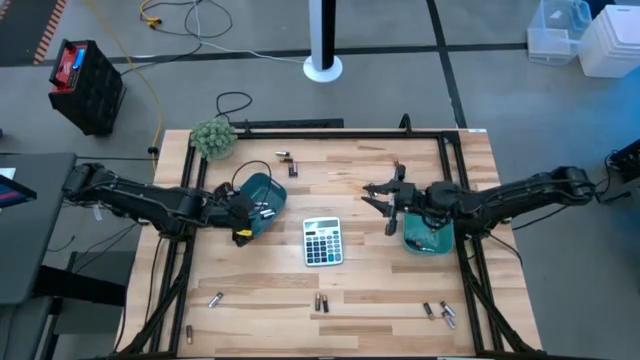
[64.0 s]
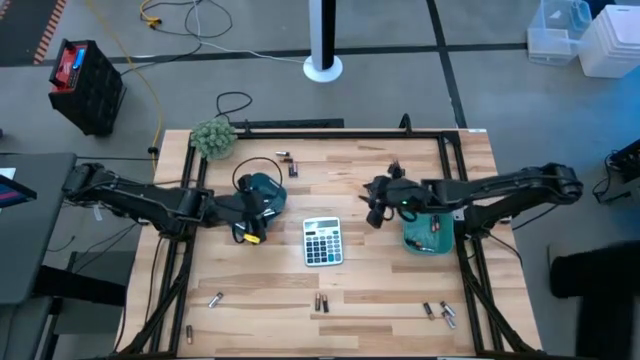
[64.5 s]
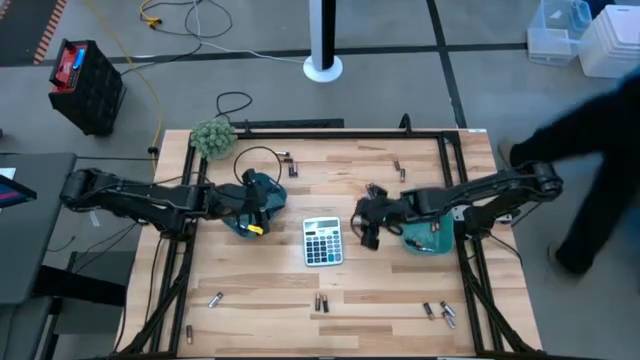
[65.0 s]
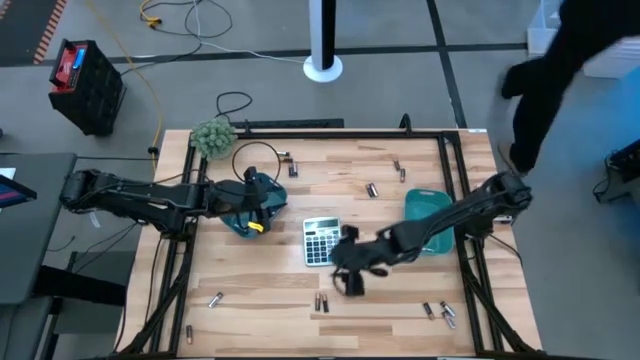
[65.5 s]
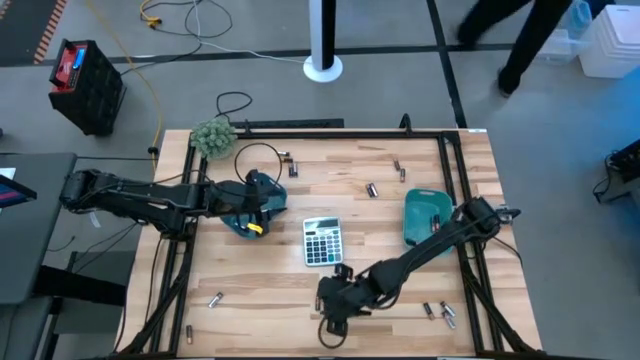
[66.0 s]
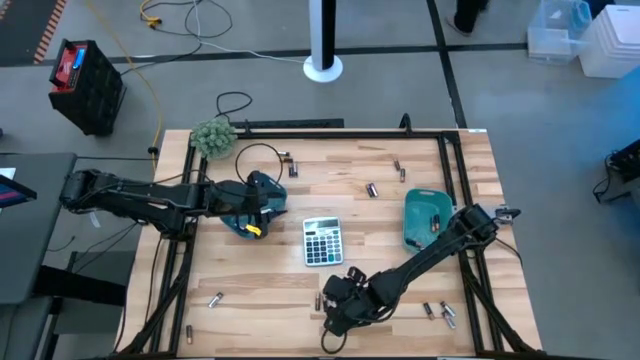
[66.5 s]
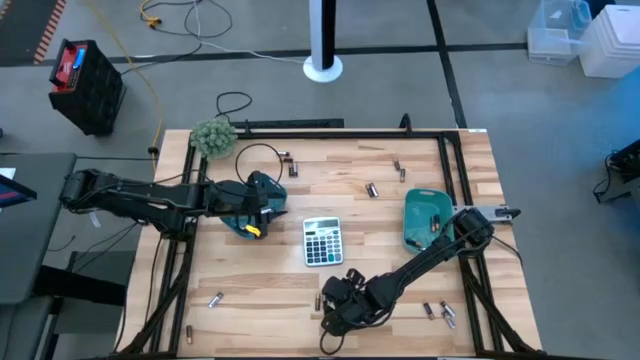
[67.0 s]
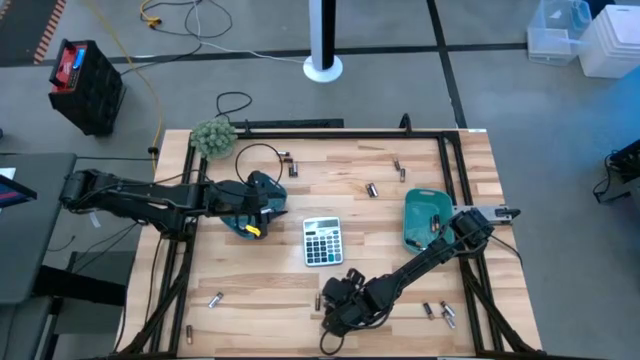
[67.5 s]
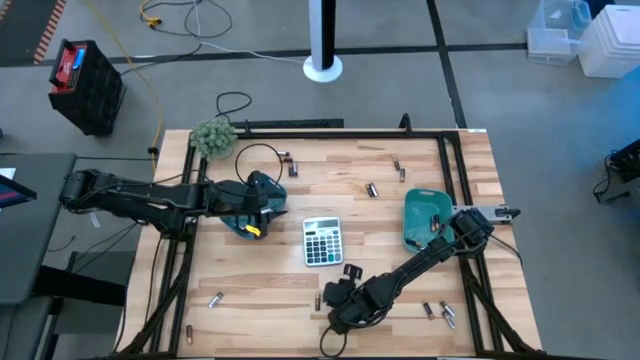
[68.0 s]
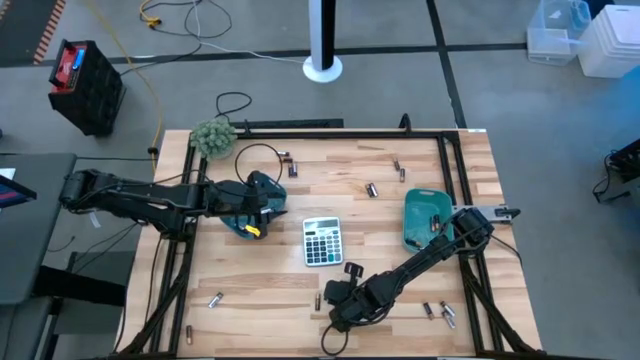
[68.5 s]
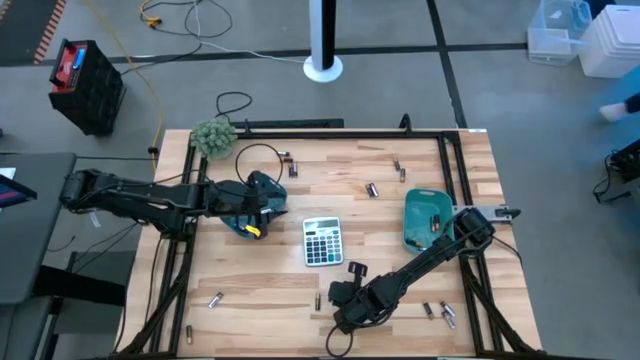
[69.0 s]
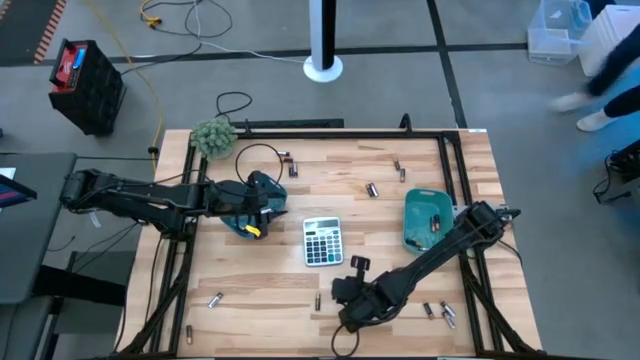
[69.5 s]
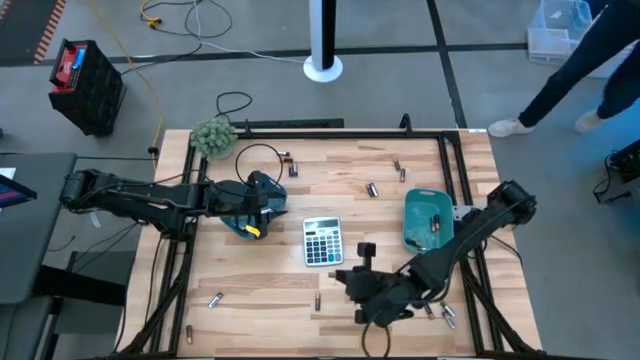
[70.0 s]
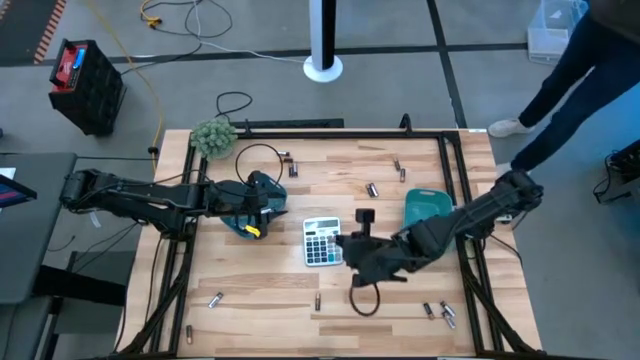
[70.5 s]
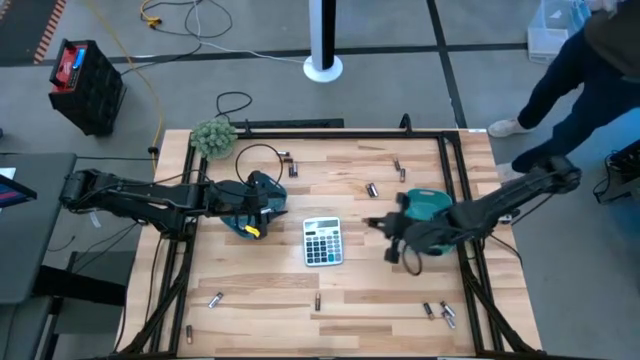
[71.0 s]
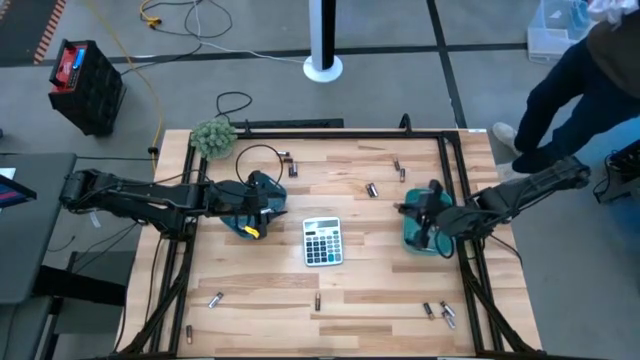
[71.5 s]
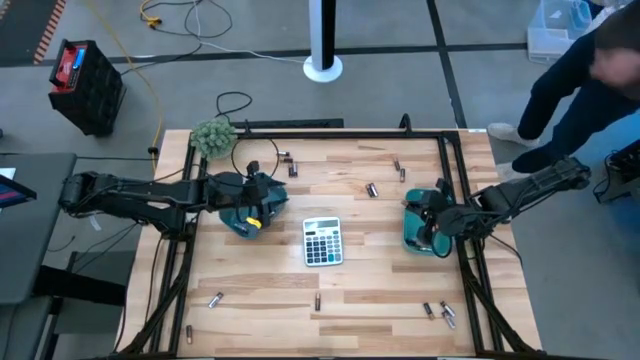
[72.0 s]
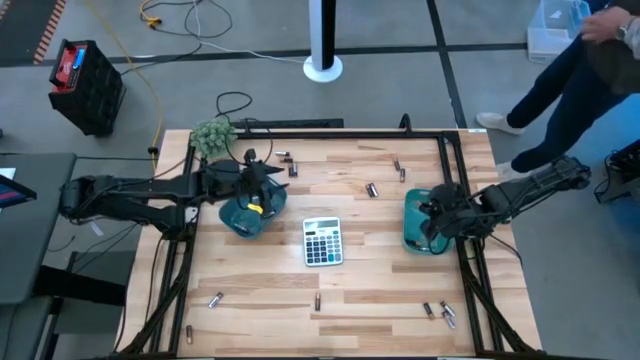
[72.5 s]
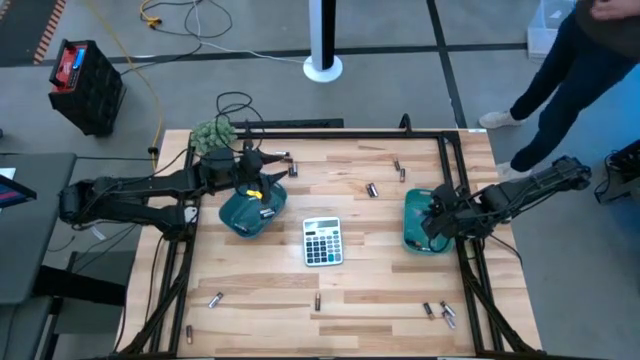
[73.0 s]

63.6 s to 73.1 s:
Task: Sort batteries
Put the brown/black battery into the green bin

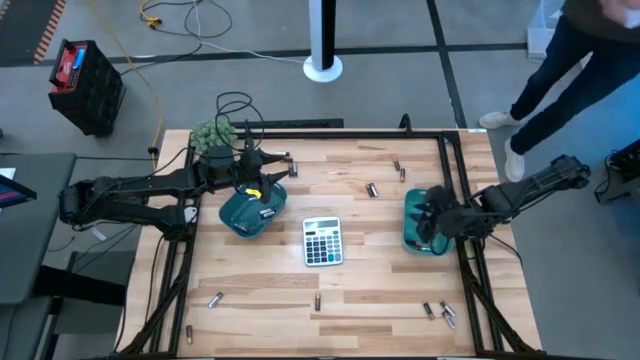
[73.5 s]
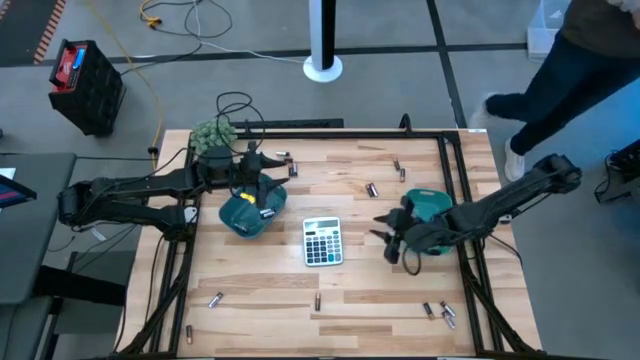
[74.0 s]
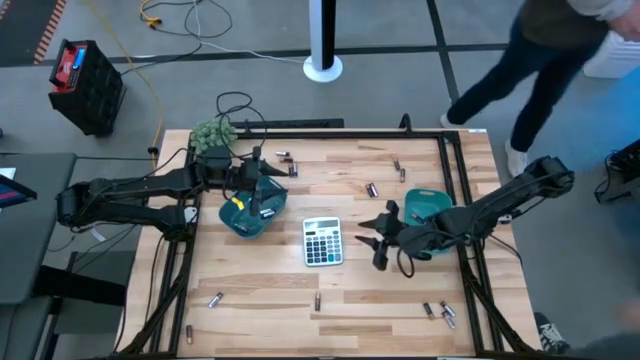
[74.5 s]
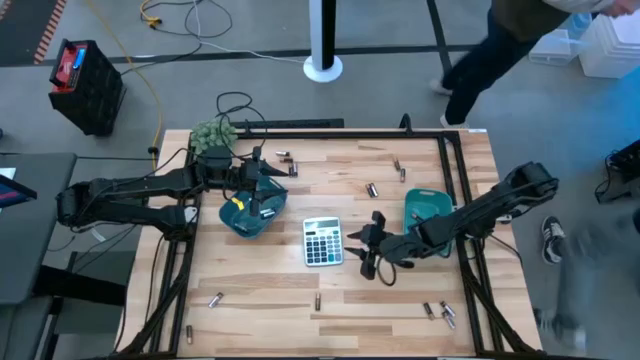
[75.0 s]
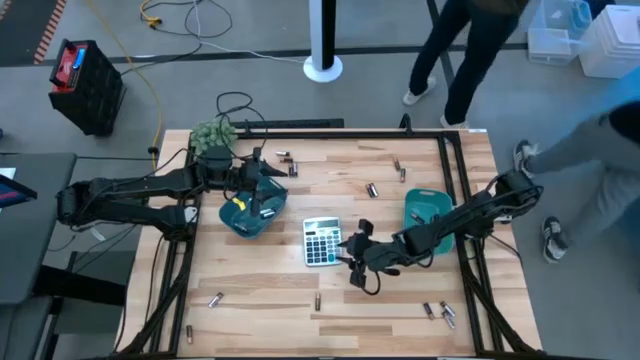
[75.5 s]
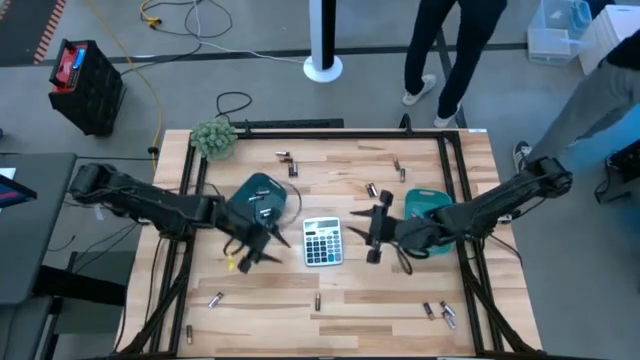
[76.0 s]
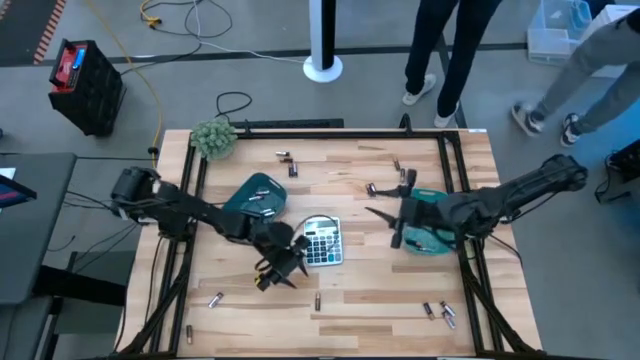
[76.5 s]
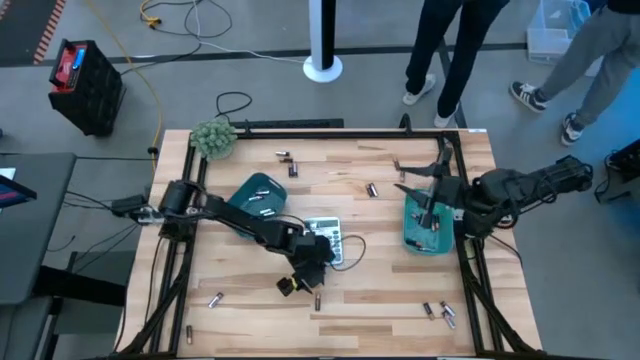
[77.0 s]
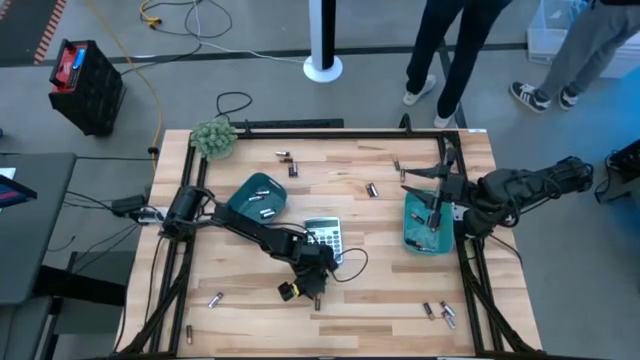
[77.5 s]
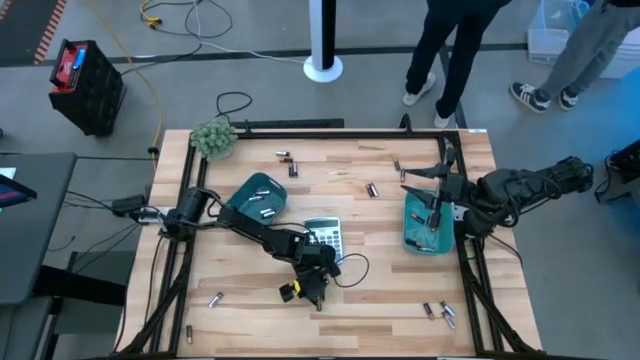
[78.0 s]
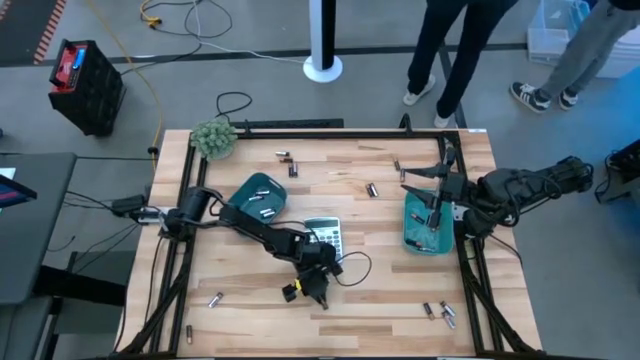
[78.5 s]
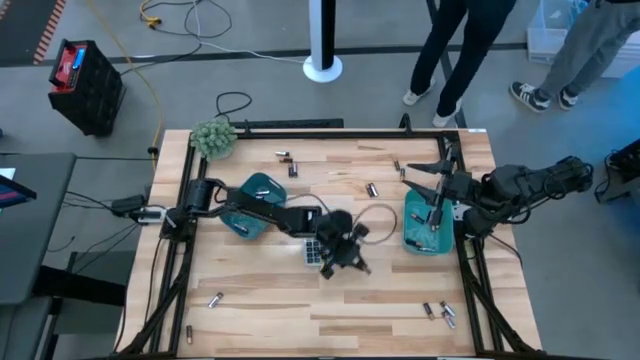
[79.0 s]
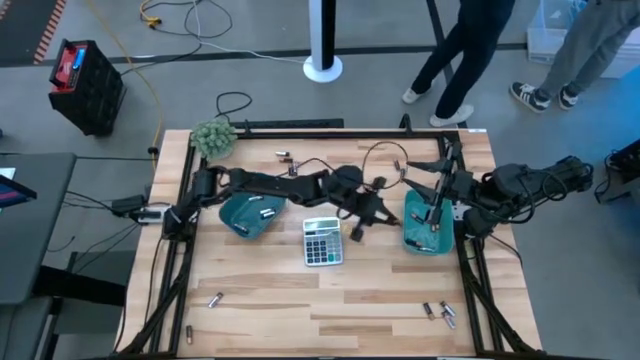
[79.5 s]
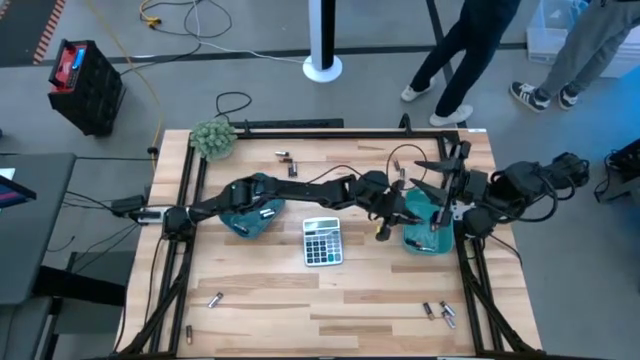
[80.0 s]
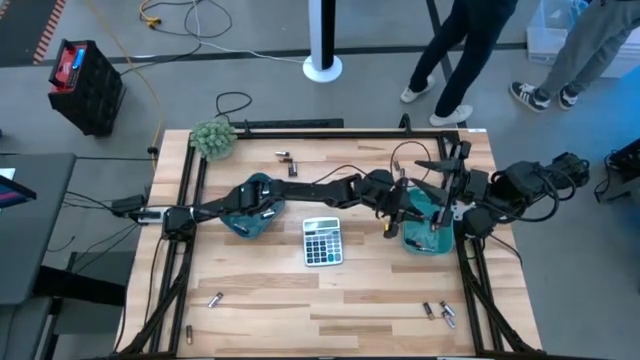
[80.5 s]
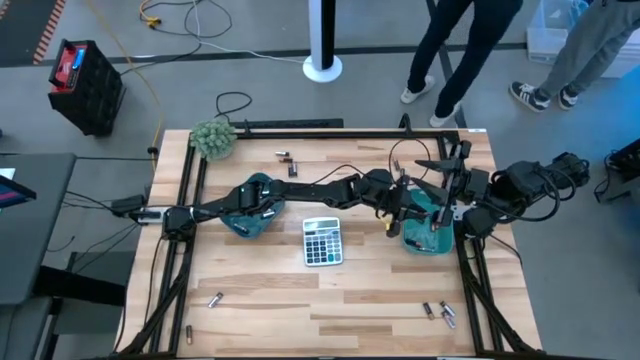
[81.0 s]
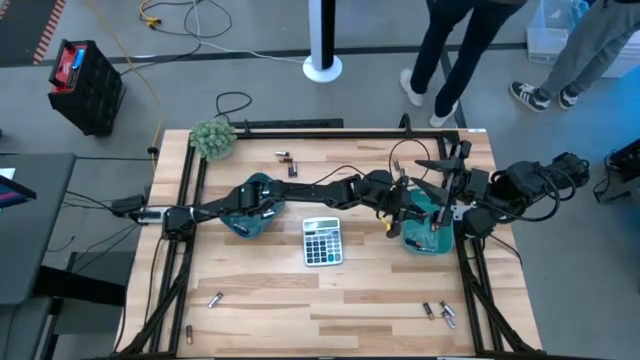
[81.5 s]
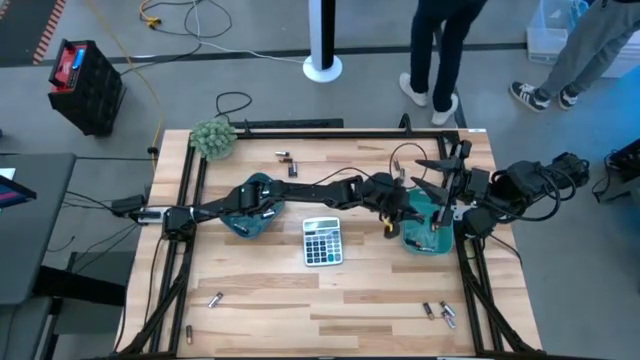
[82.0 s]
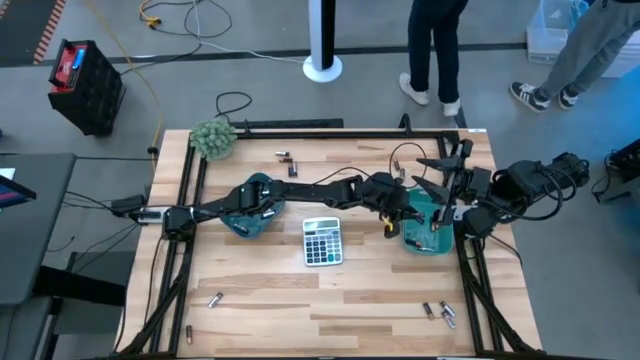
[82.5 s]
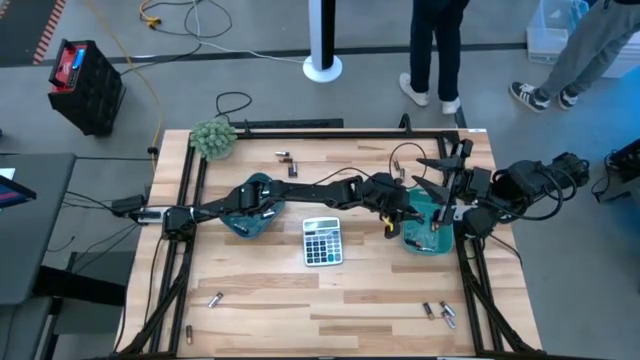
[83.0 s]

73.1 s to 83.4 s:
Put the brown/black battery into the green bin

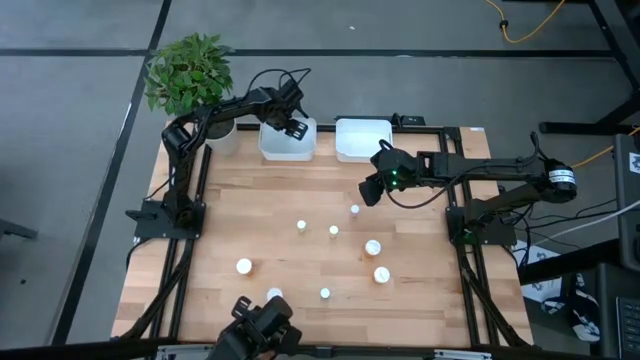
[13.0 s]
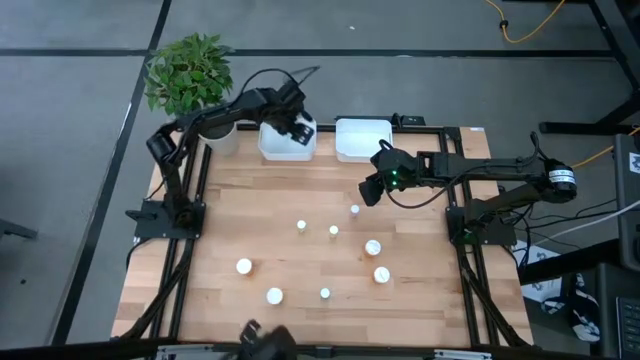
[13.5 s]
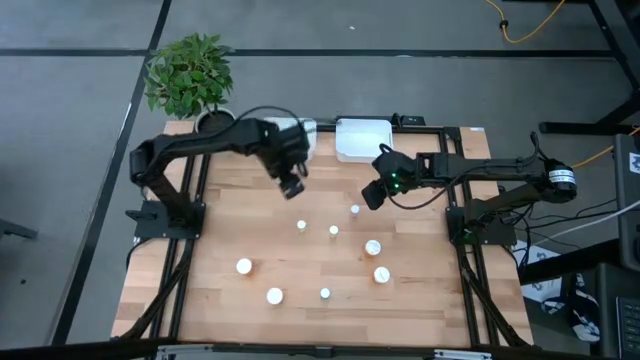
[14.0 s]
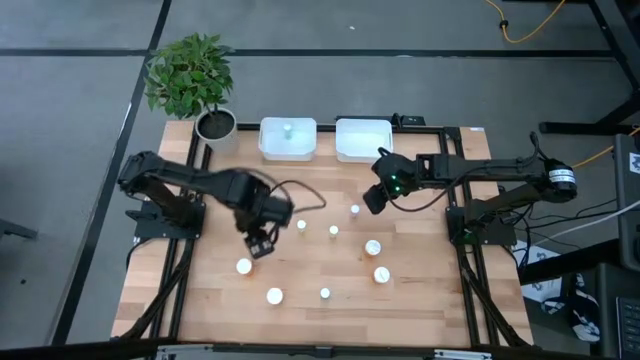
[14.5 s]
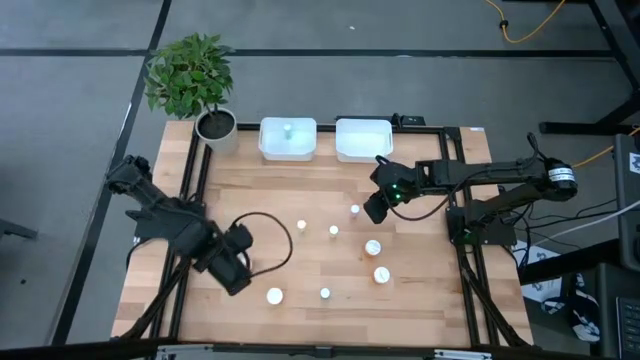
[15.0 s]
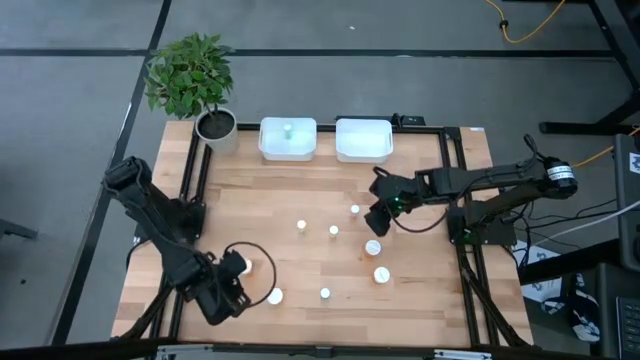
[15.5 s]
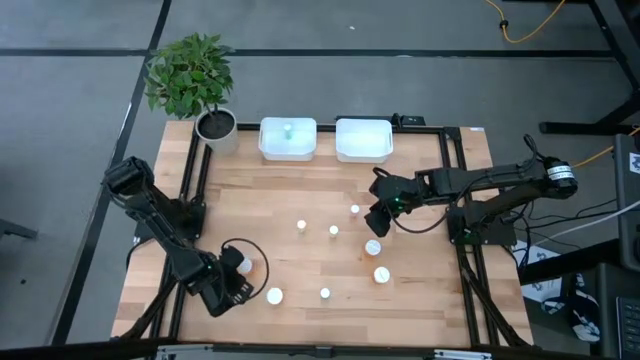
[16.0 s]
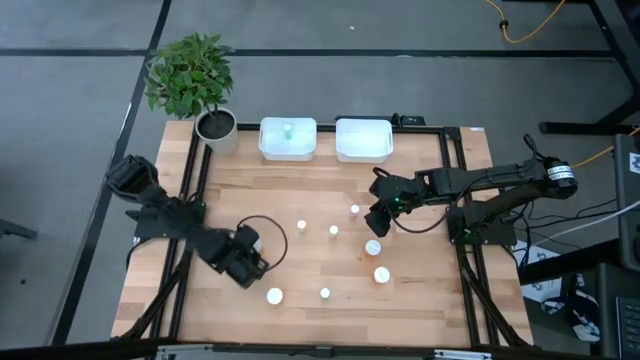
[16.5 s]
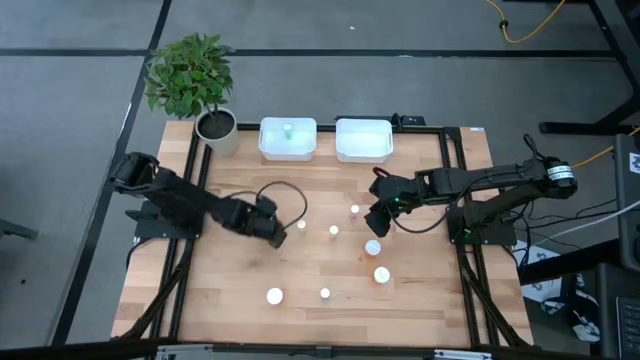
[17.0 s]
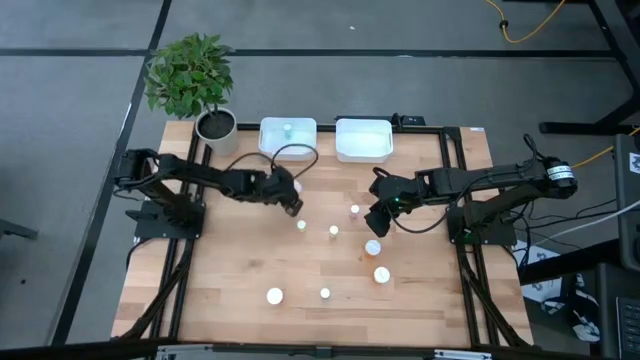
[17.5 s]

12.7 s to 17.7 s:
Task: Pick and place medicine bottles into bin by pill shape (circle, oval)
Move the orange capsule bottle to the top center of the table
